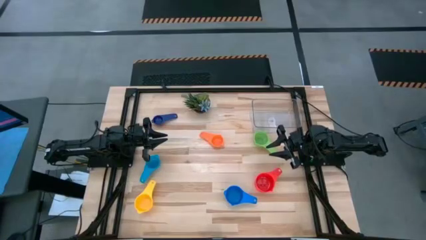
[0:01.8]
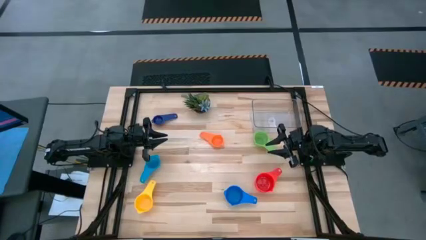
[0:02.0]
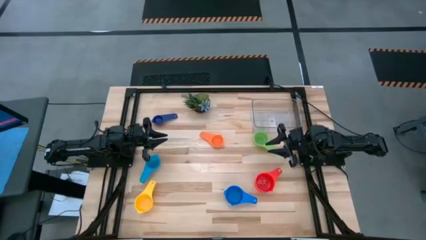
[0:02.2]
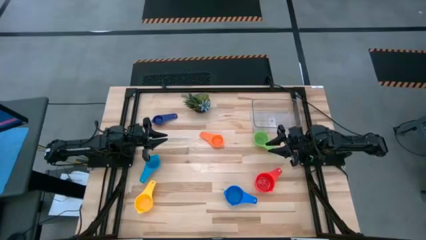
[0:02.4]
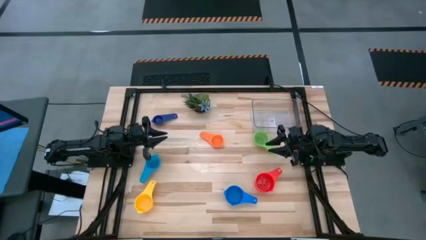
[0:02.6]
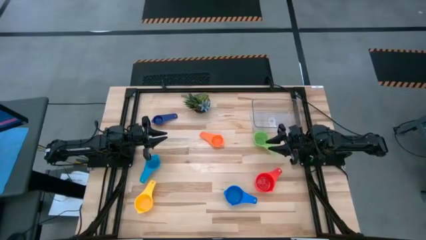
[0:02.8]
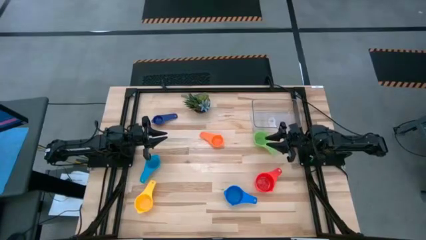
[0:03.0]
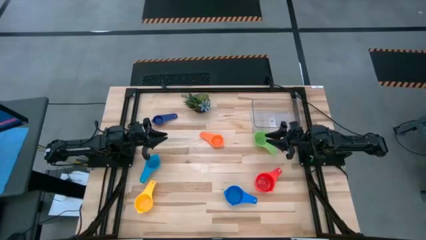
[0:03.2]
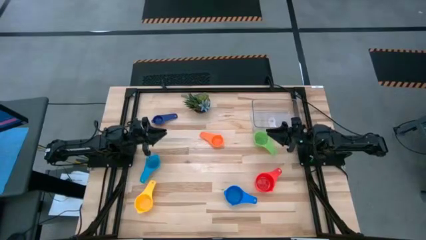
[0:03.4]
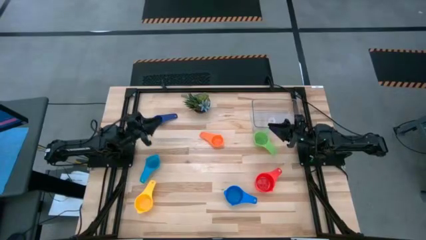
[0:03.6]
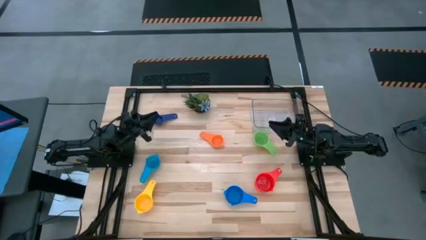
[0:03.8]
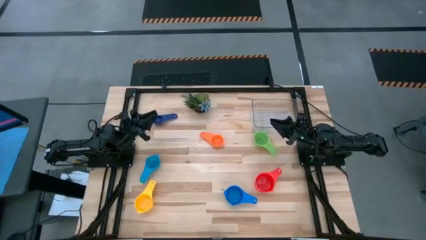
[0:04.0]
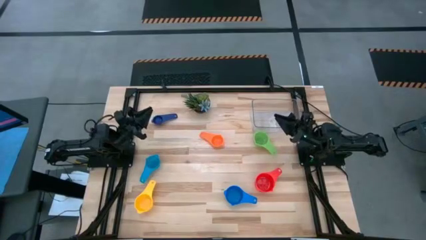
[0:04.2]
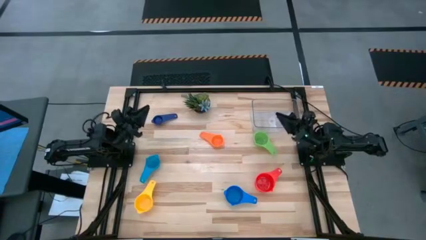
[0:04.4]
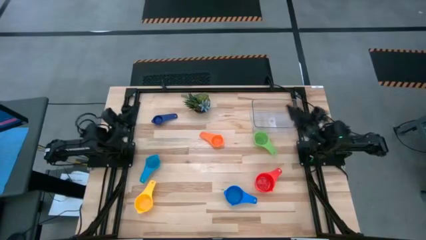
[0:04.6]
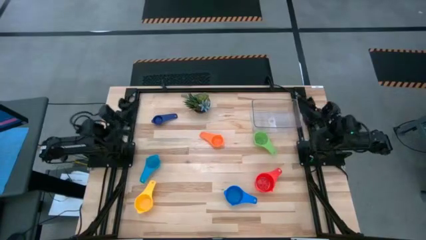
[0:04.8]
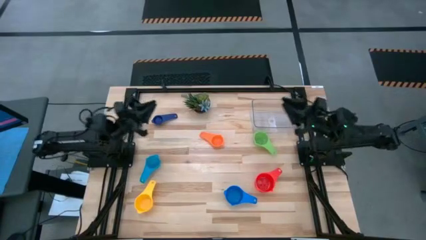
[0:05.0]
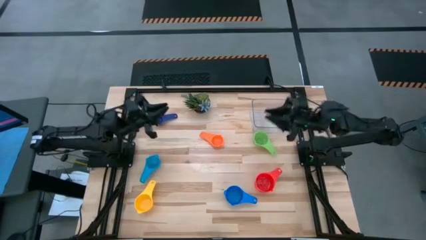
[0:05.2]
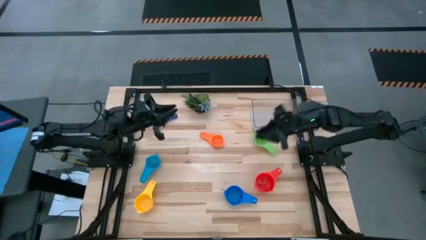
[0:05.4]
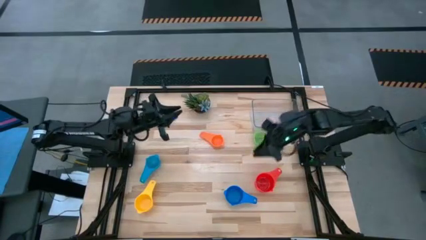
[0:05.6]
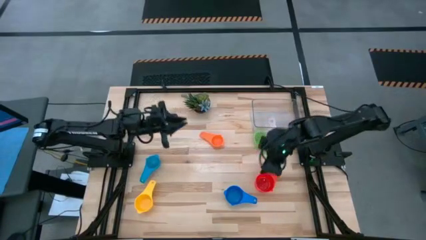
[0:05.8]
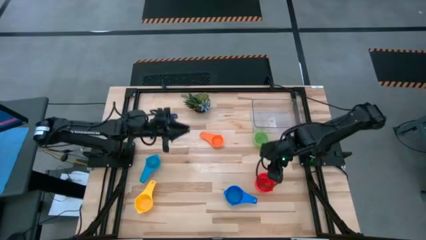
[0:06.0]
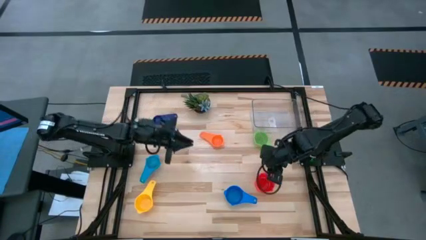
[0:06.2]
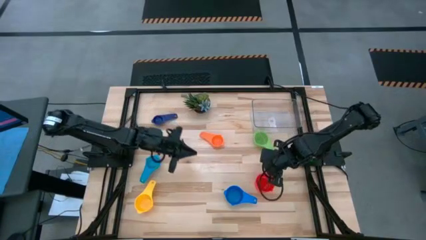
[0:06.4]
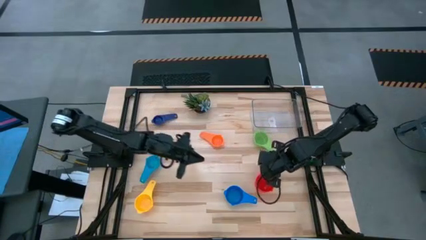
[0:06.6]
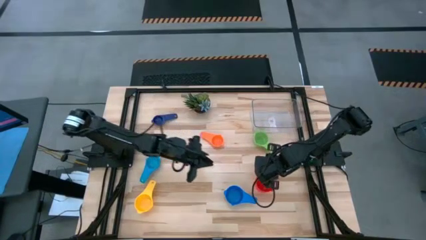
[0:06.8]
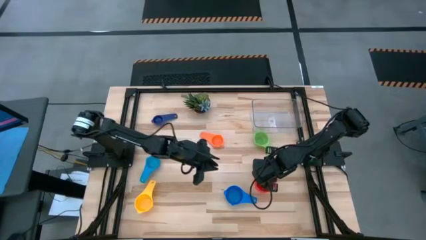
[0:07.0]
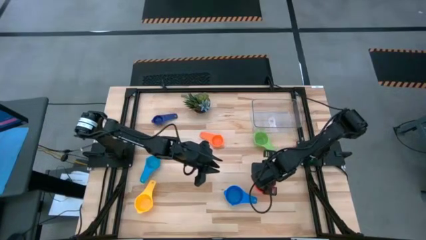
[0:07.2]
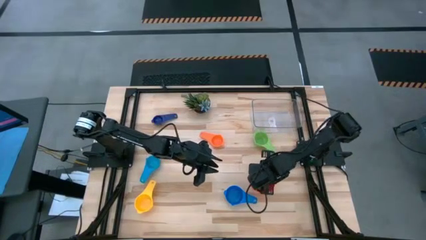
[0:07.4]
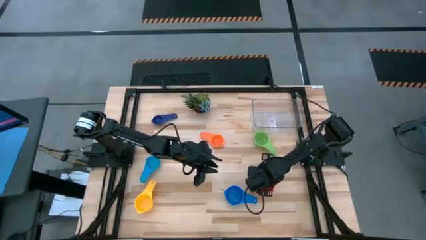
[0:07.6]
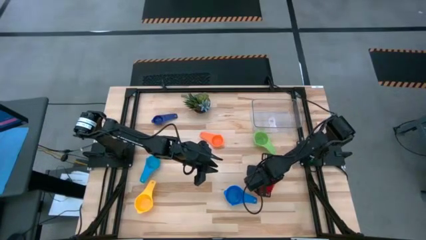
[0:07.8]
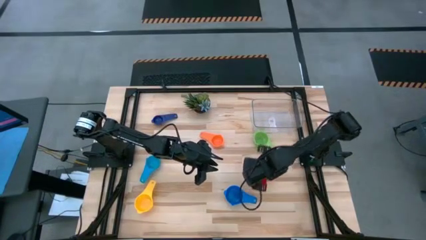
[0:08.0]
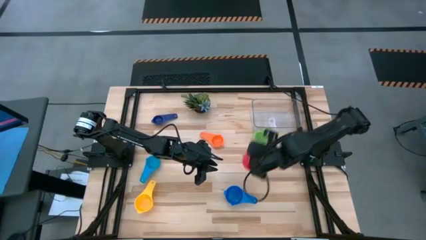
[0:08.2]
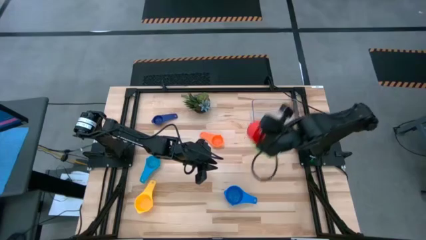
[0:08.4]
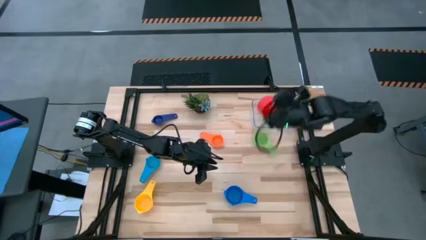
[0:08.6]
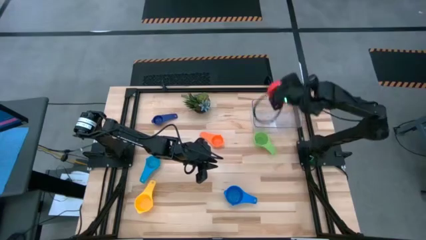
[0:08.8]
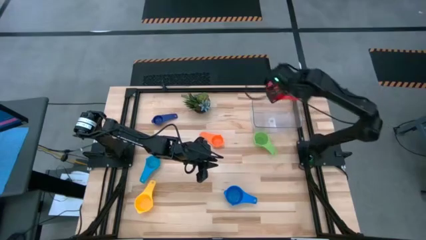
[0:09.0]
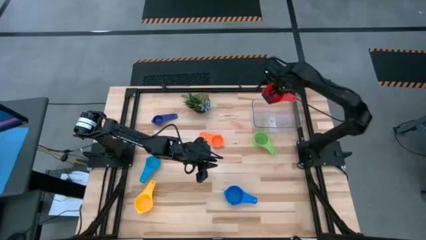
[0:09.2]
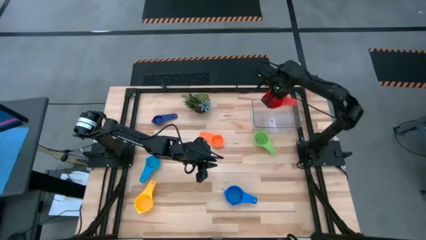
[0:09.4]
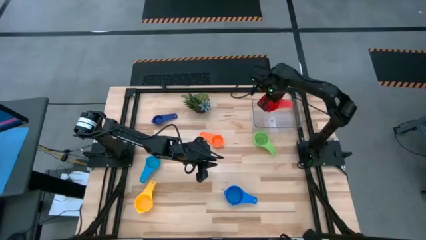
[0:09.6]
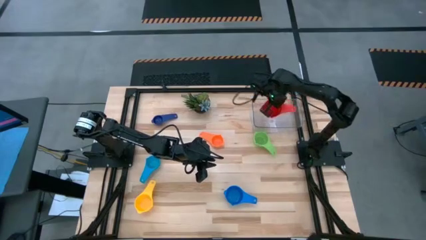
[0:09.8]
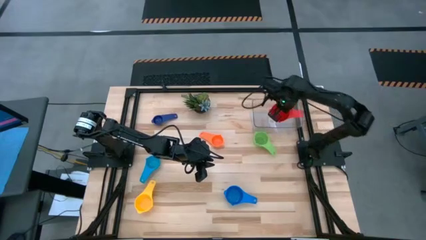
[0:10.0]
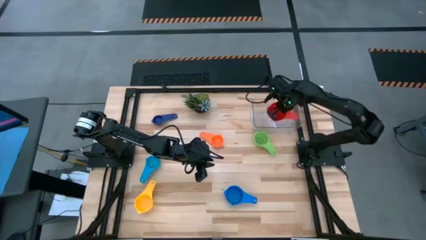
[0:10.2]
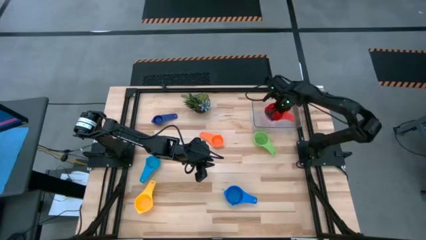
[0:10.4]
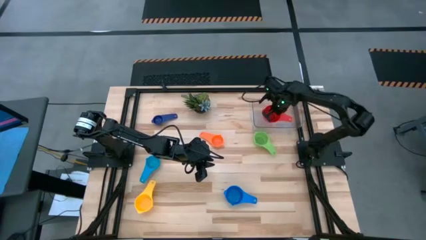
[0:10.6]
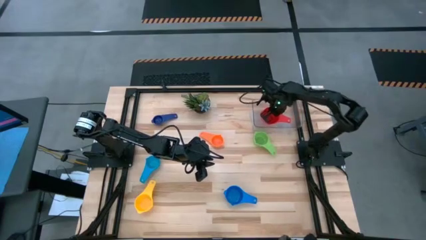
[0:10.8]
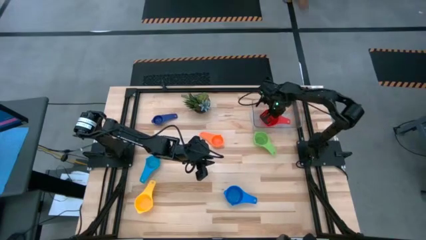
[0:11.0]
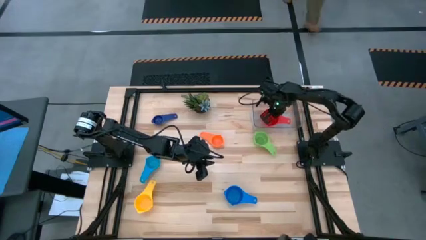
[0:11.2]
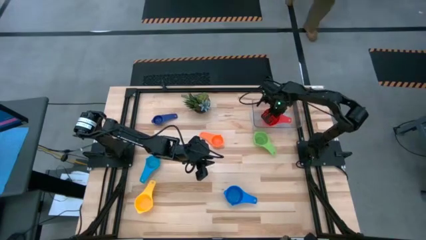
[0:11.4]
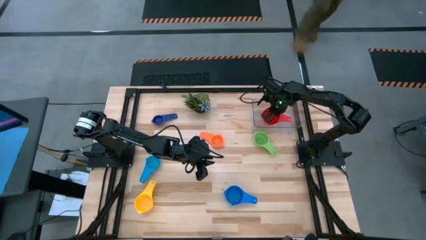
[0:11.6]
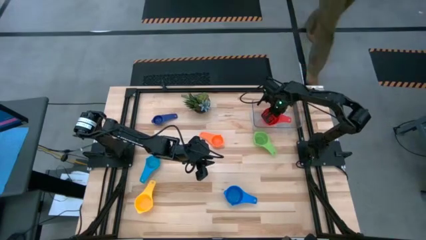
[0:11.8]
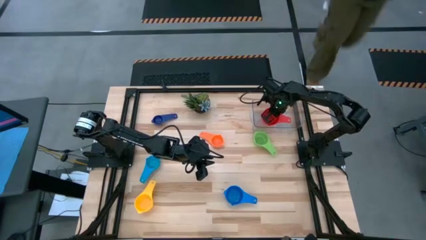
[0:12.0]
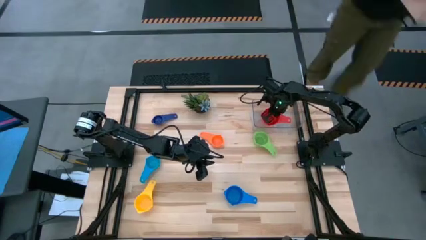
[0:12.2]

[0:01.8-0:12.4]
Task: Nest measuring cups in basket
Put the red measuring cup into the transparent bin
